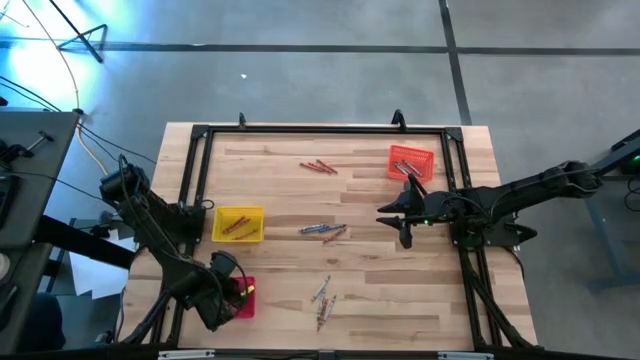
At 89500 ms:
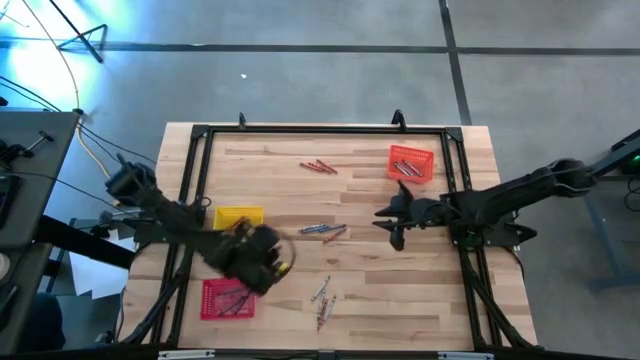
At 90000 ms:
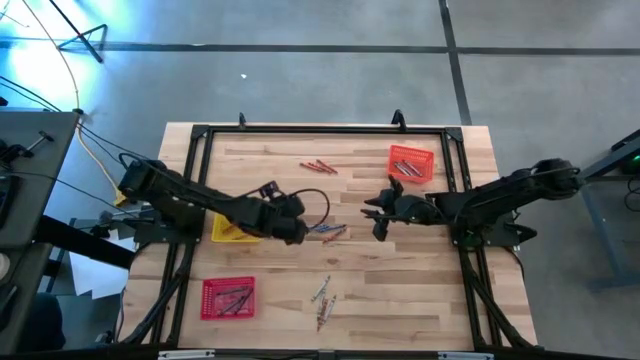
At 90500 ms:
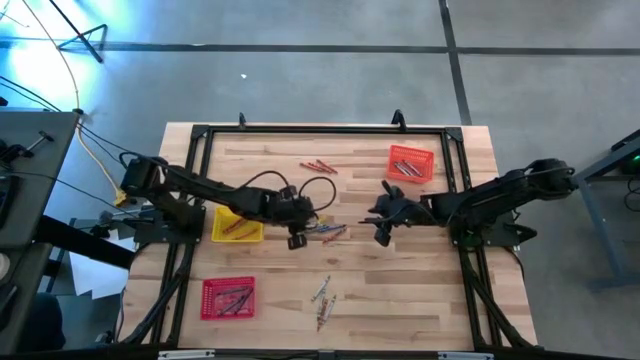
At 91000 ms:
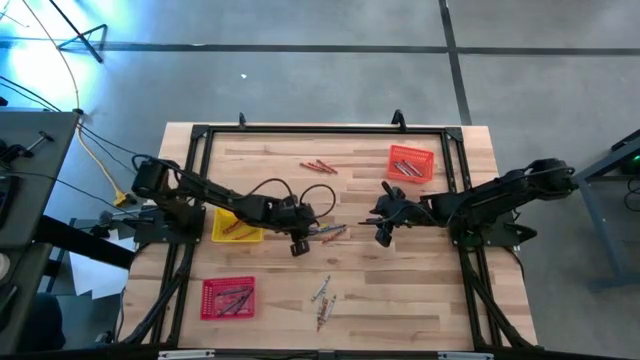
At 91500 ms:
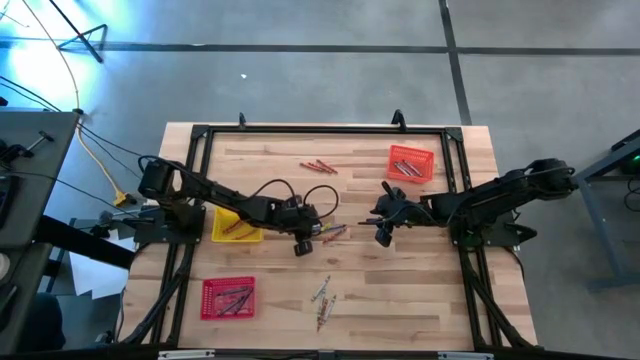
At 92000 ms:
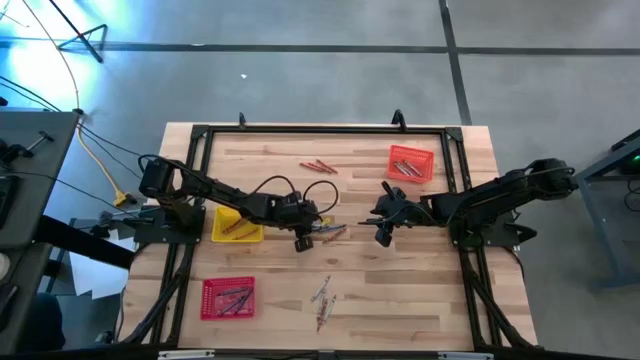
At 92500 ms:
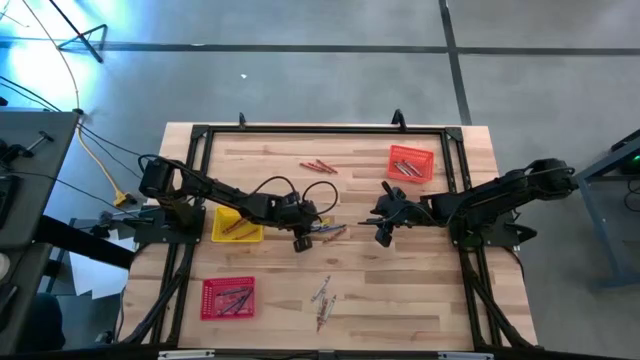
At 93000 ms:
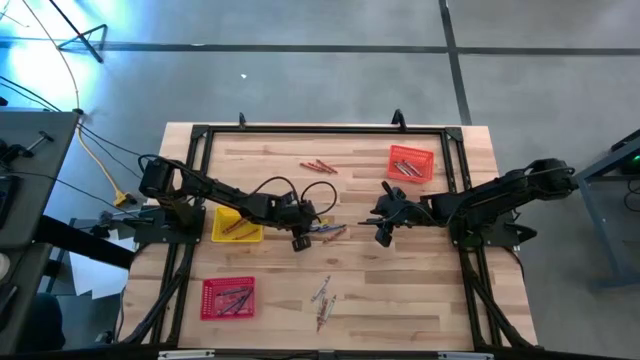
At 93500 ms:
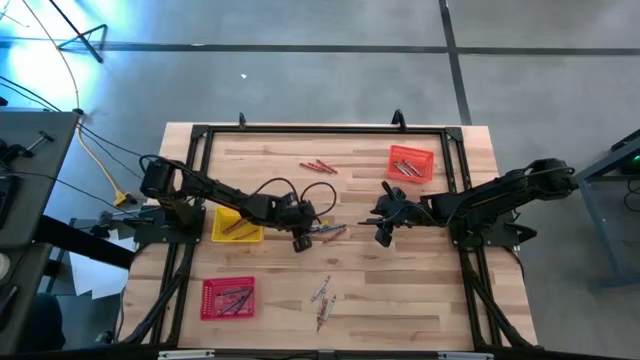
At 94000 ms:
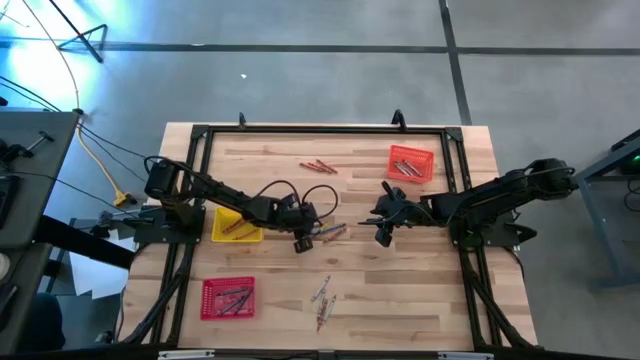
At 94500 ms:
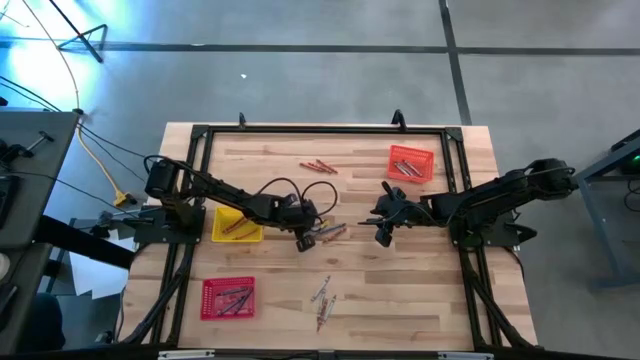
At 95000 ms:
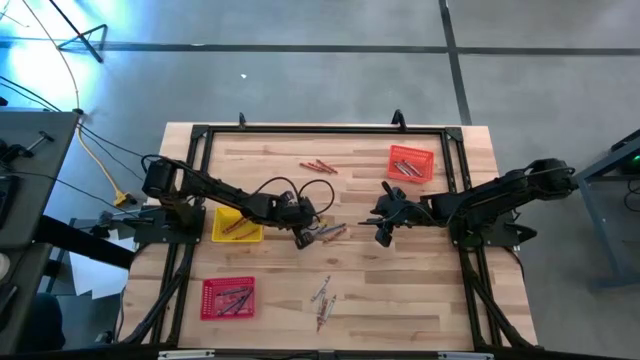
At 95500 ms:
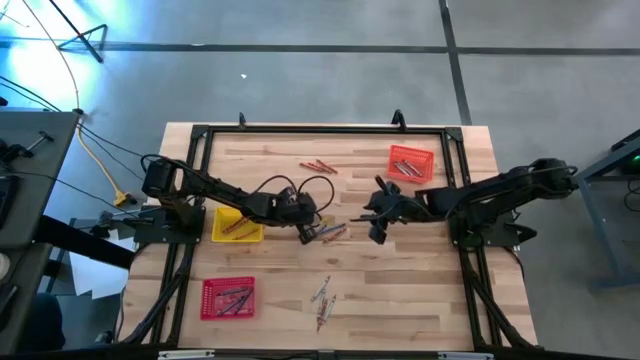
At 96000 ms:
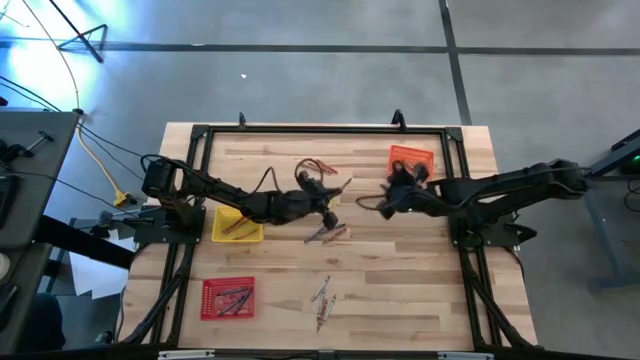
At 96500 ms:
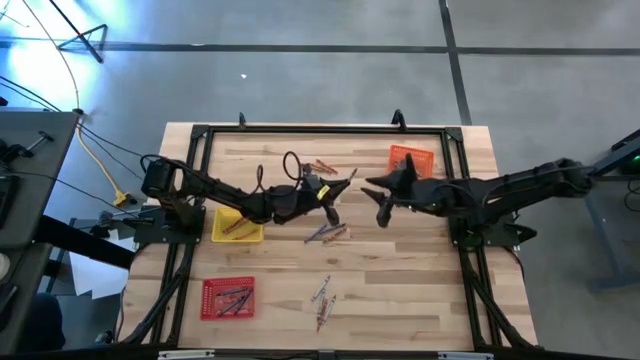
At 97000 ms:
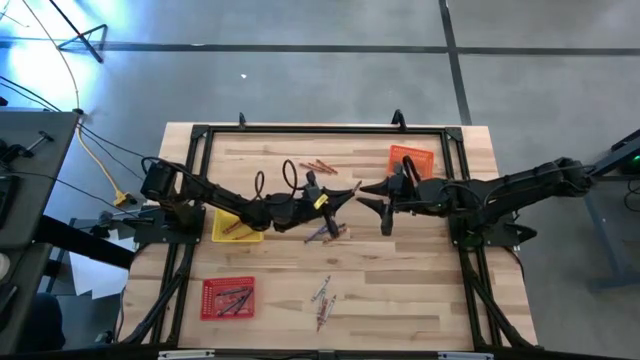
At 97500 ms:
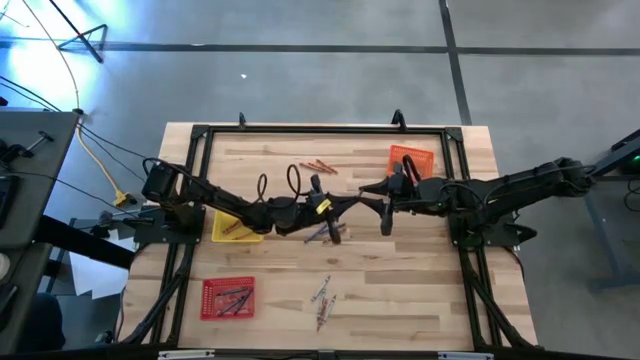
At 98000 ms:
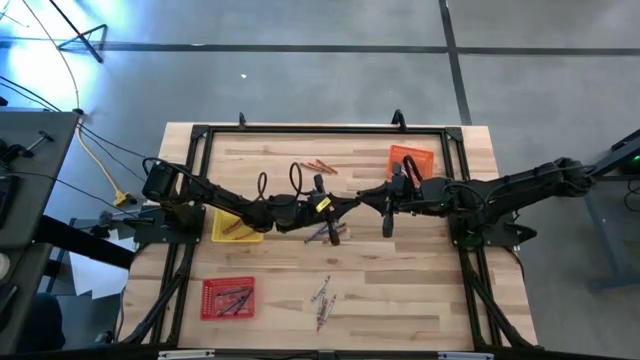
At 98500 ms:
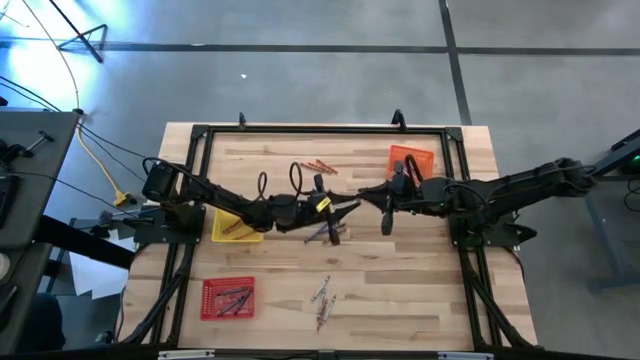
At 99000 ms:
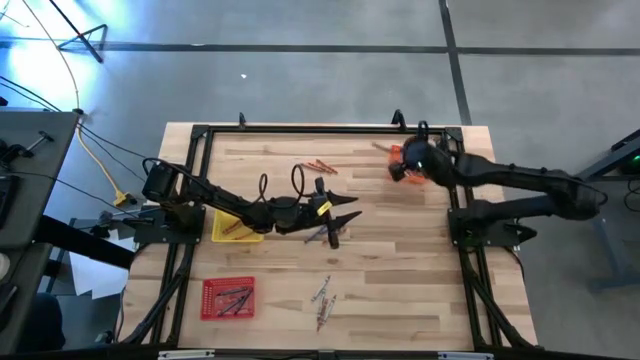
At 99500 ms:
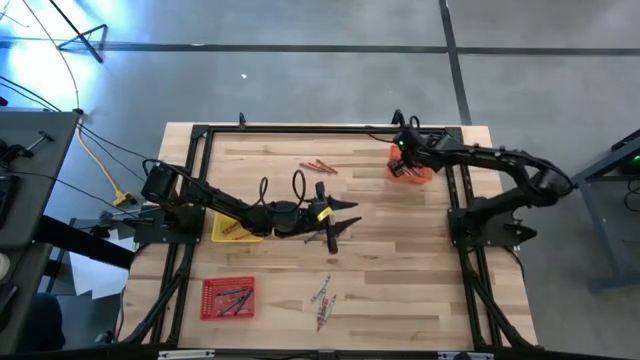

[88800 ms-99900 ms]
Task: Sort crayons
Put the gray crayon into the orange bin

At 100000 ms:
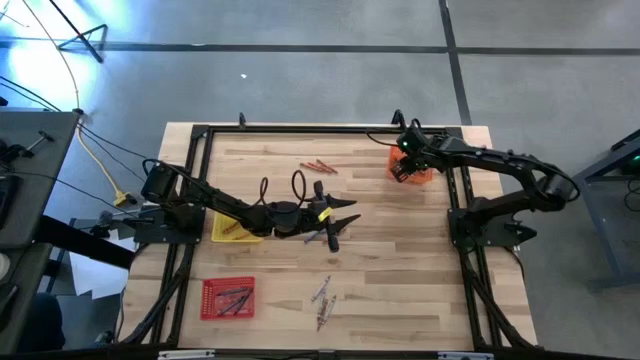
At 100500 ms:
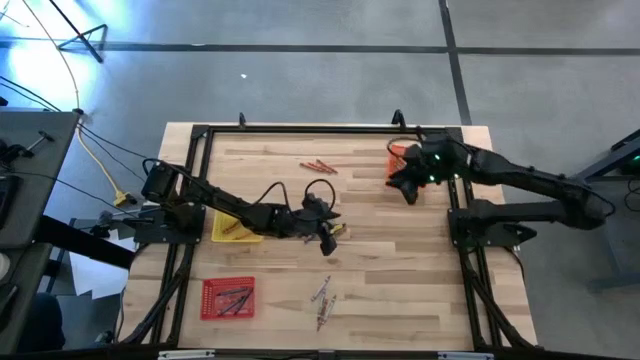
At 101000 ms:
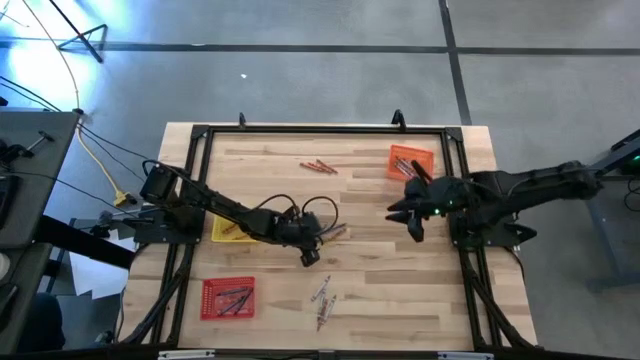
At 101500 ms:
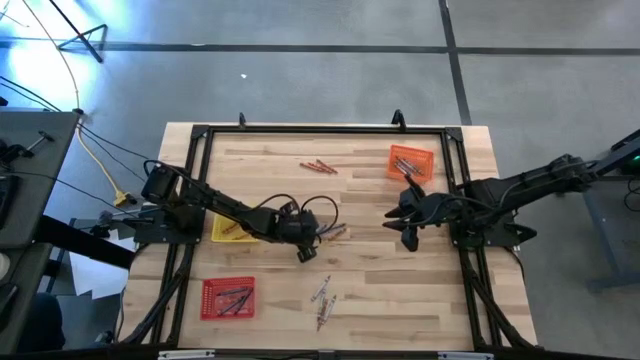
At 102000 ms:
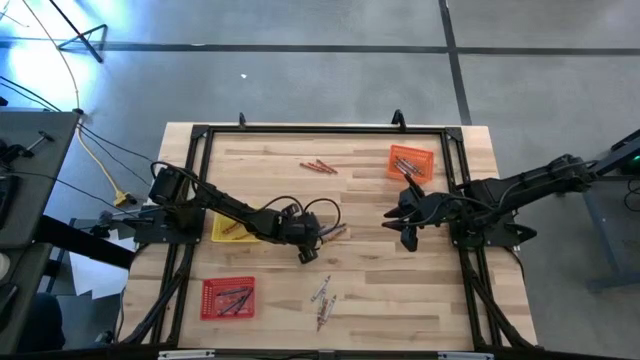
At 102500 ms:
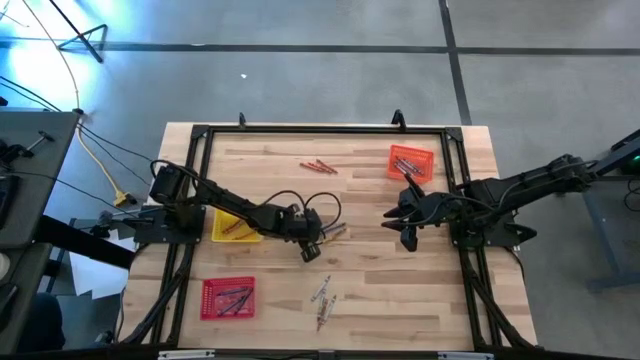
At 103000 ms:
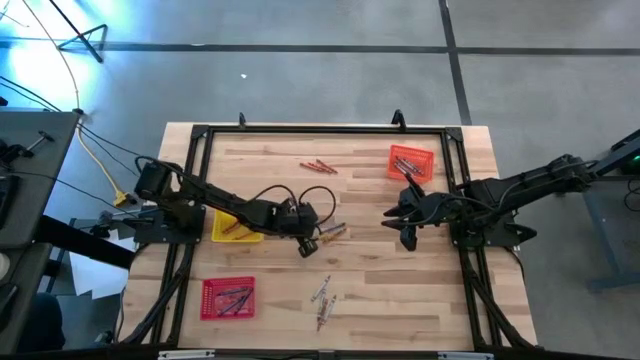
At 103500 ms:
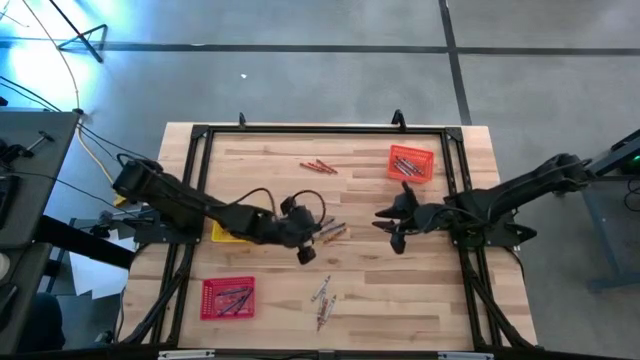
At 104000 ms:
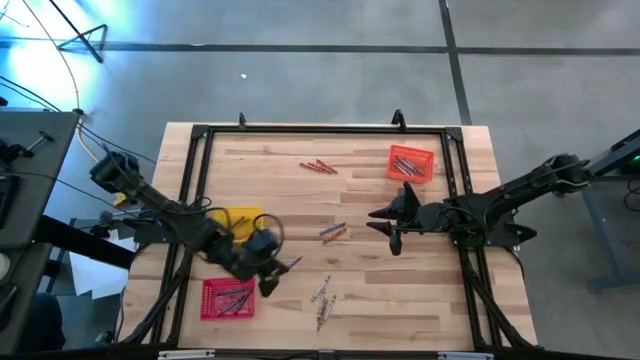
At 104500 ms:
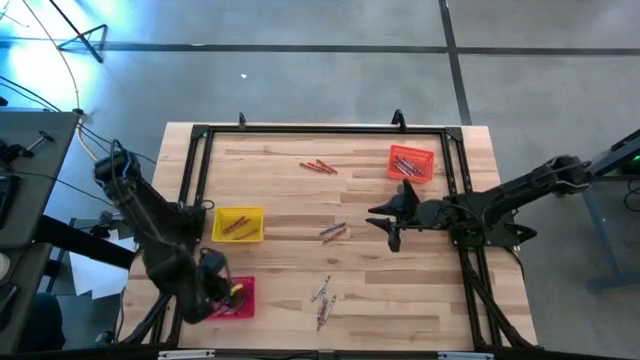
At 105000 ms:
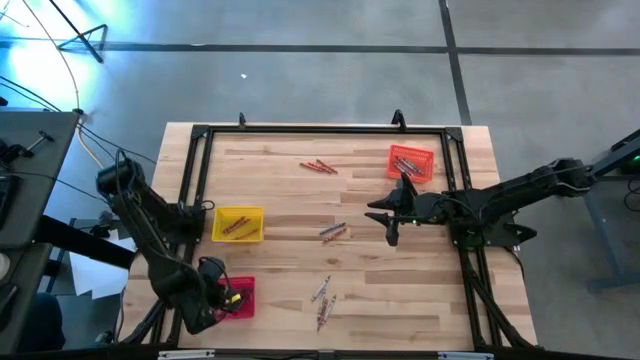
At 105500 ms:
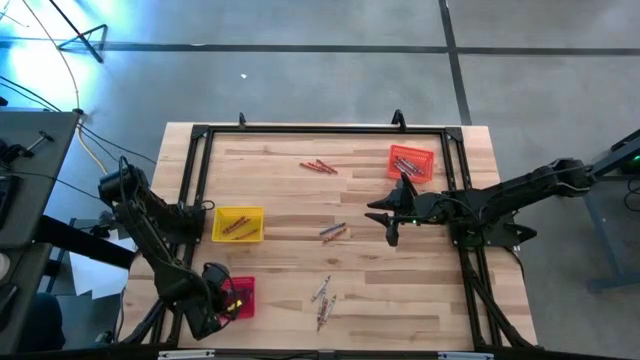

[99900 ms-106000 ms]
Put the blue crayon into the red bin

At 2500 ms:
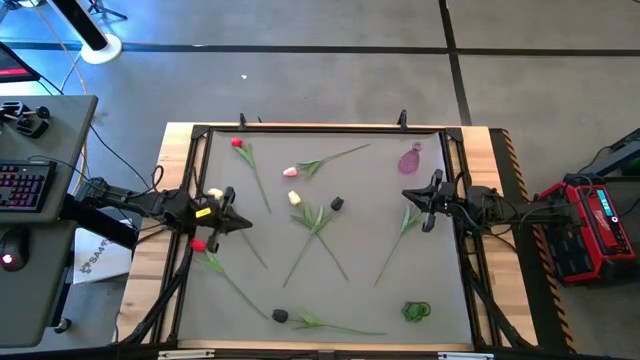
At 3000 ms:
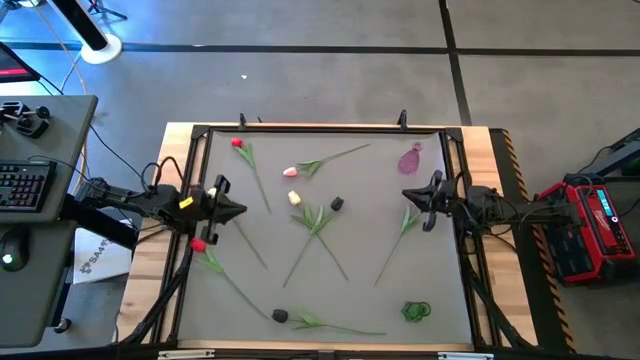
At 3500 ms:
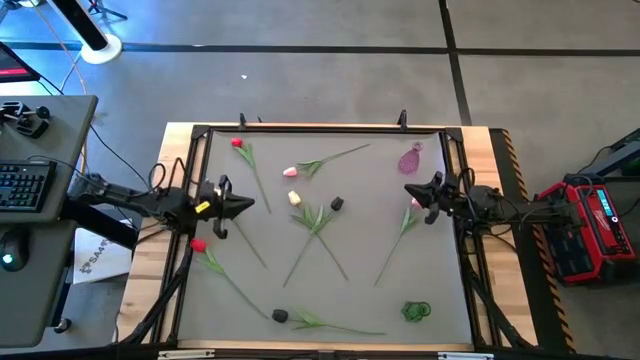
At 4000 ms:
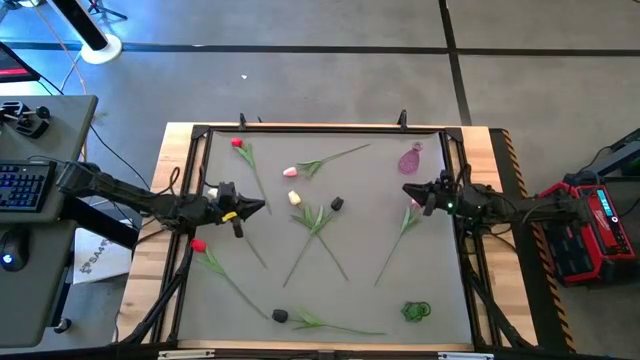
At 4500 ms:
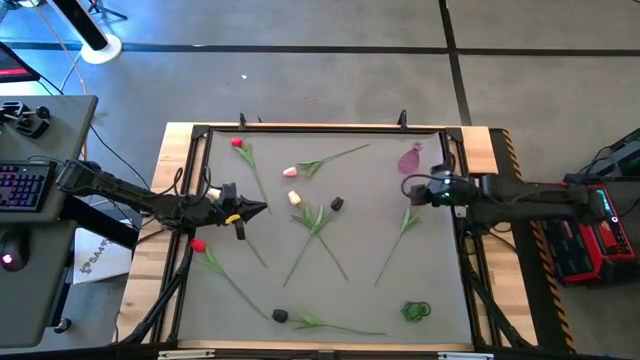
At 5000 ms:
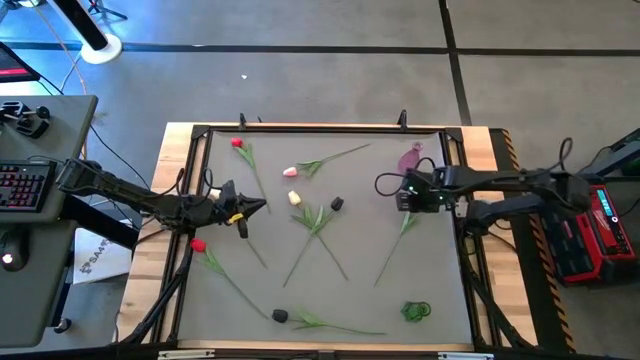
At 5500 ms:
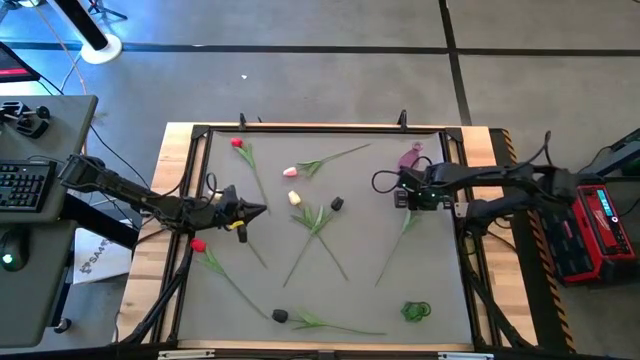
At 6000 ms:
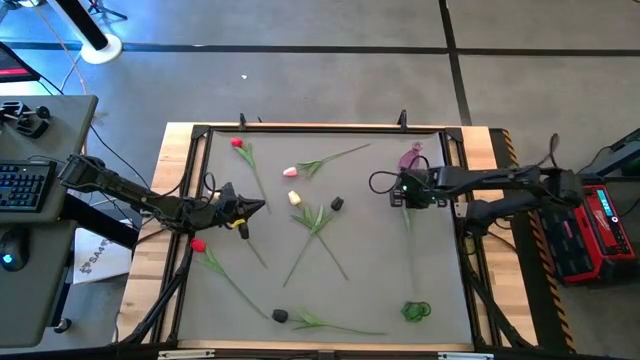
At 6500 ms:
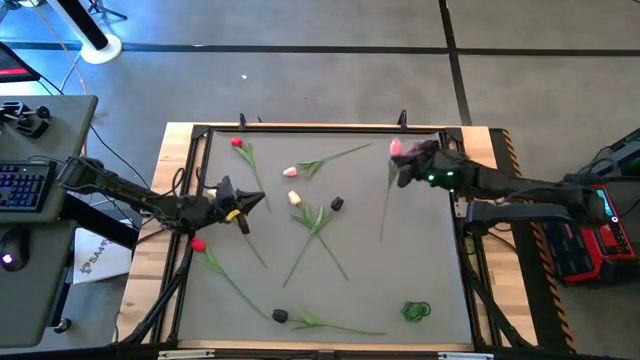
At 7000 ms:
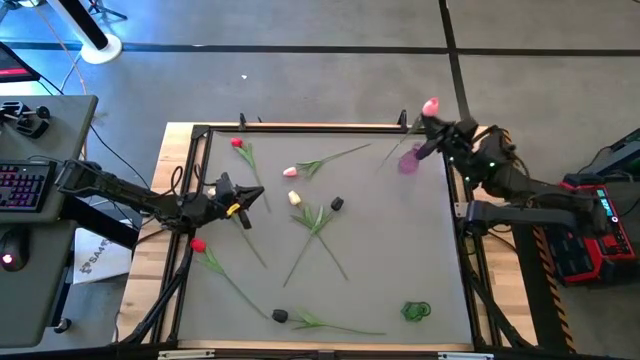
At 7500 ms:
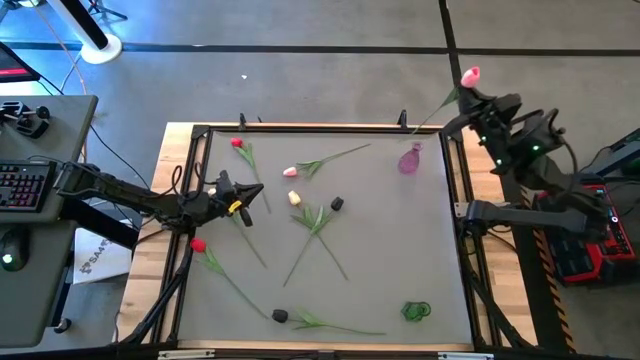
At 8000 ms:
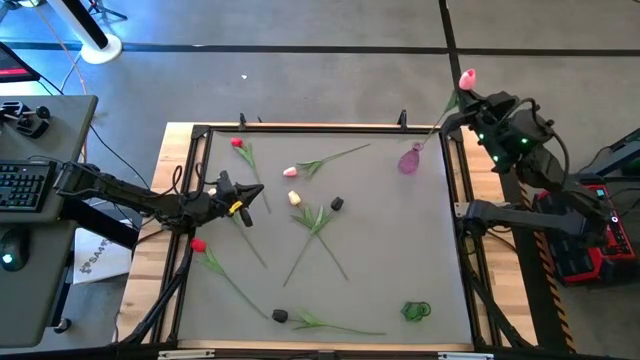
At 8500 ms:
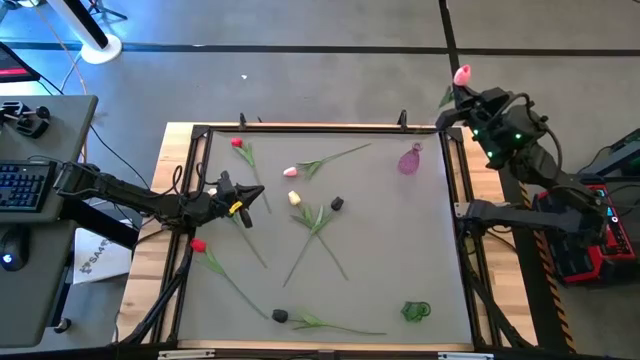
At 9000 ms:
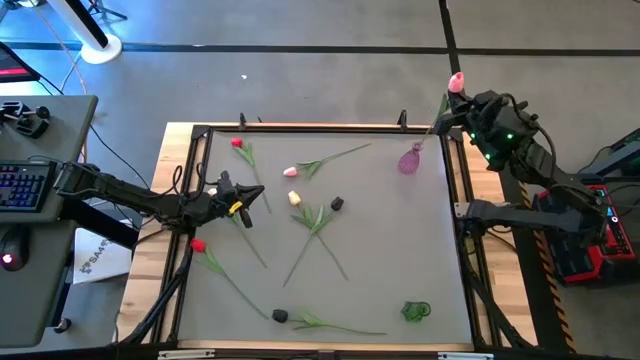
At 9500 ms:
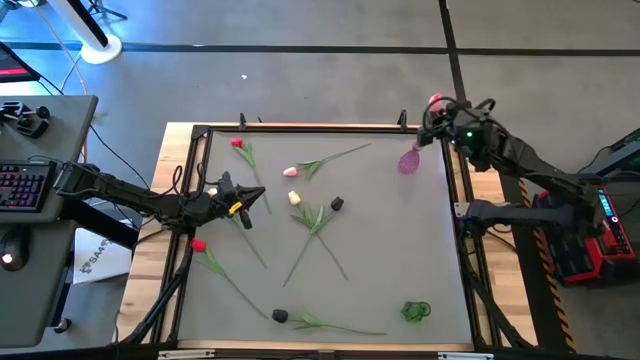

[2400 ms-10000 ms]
Task: Sort flowers into vase by color
Put the right pink tulip into the violet vase
